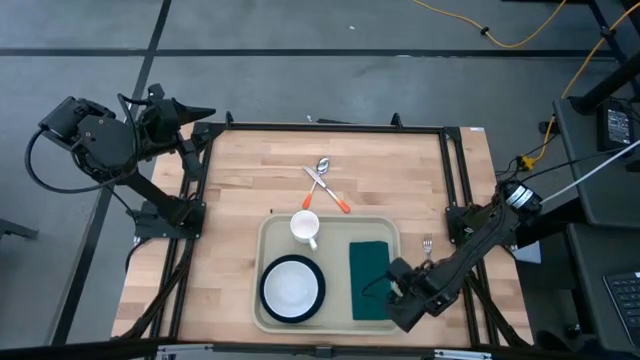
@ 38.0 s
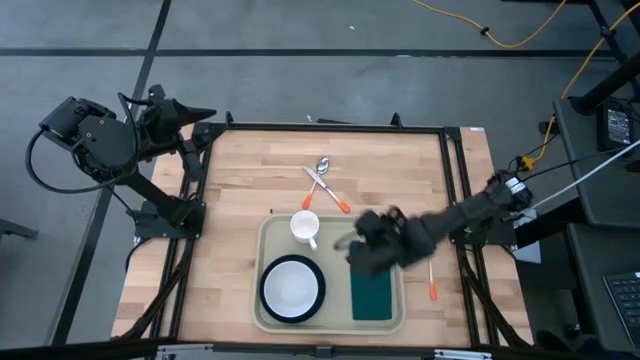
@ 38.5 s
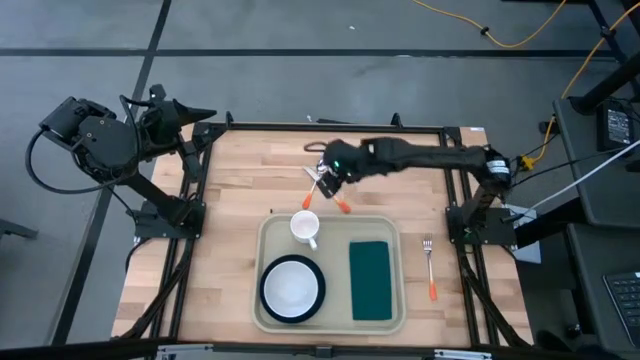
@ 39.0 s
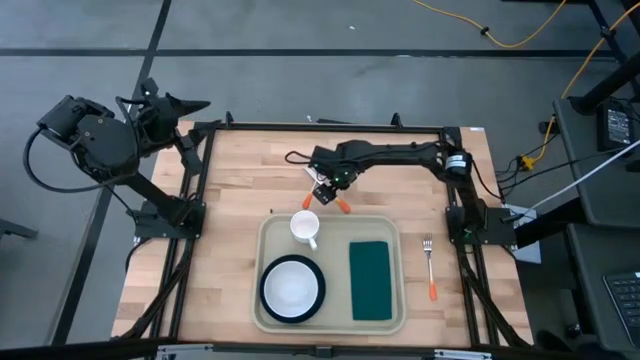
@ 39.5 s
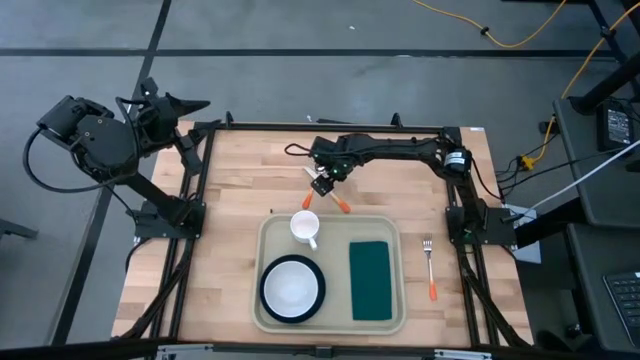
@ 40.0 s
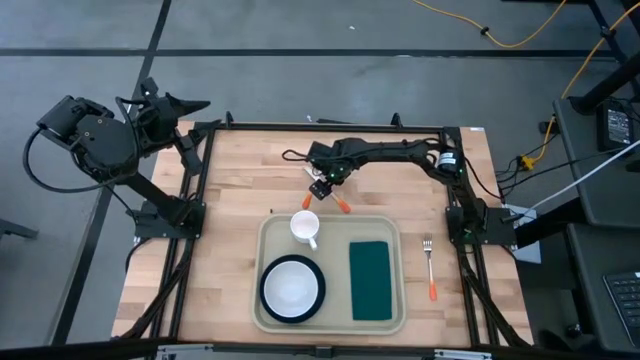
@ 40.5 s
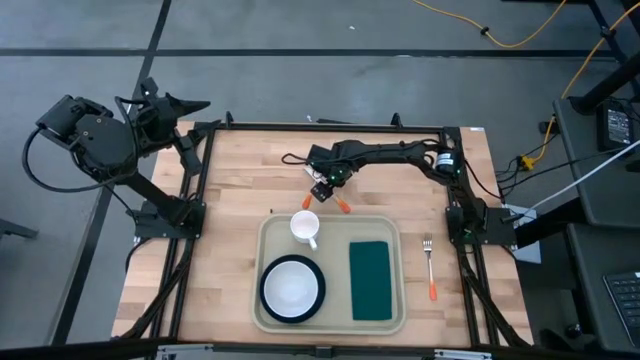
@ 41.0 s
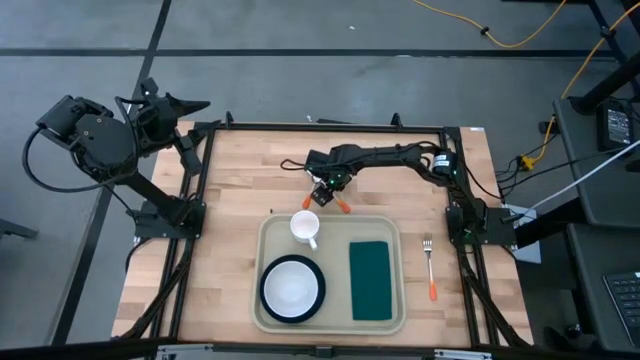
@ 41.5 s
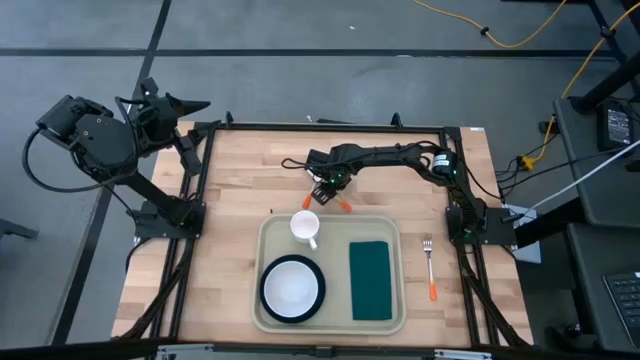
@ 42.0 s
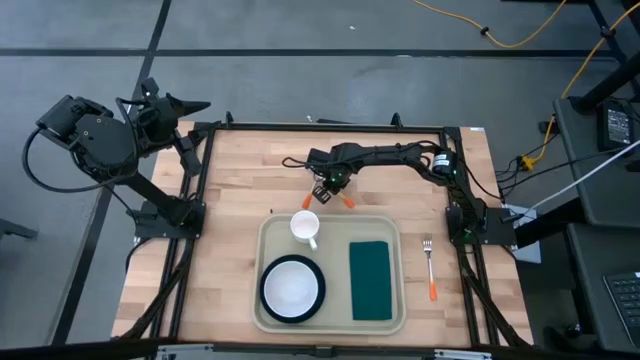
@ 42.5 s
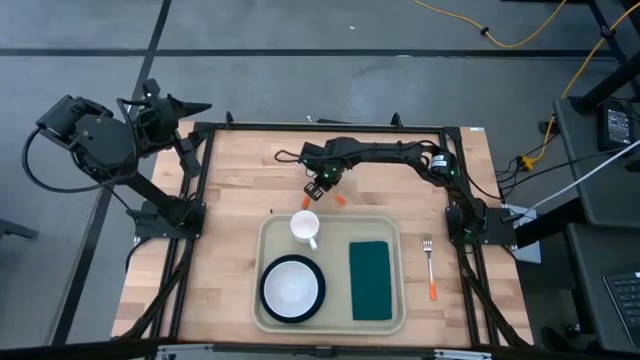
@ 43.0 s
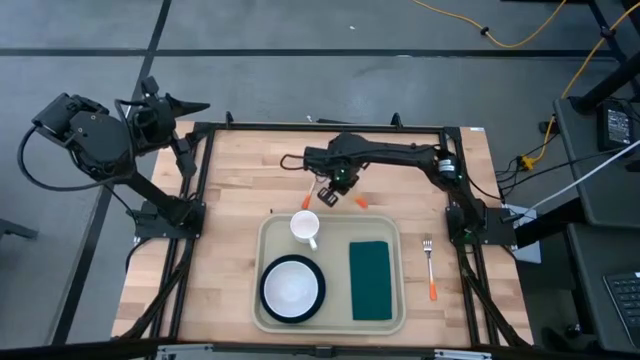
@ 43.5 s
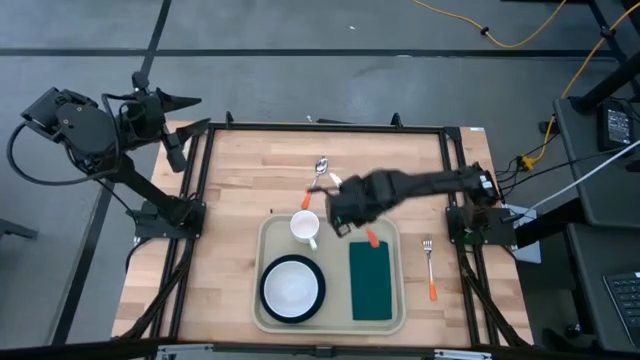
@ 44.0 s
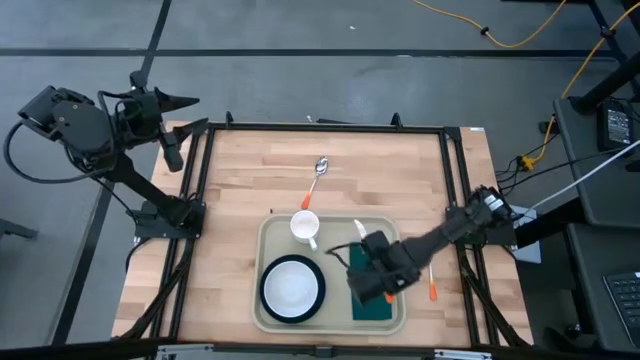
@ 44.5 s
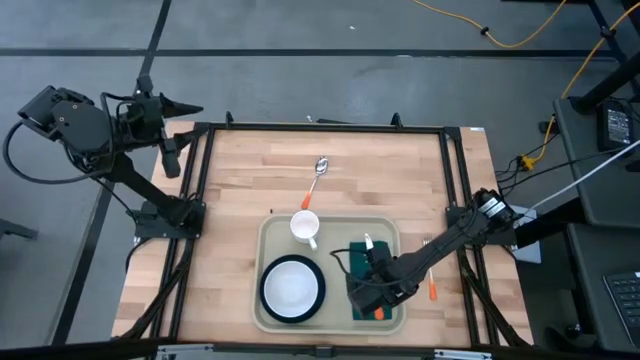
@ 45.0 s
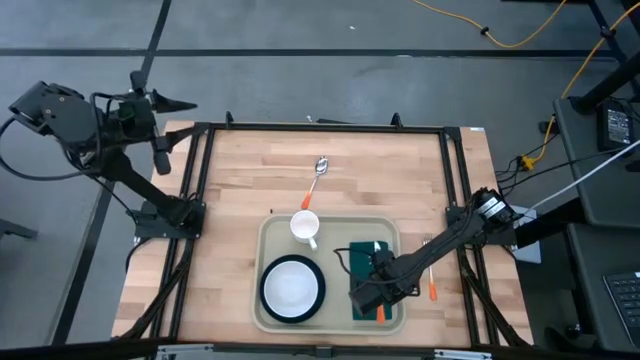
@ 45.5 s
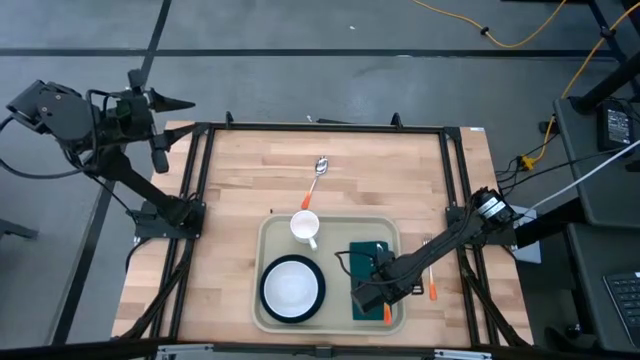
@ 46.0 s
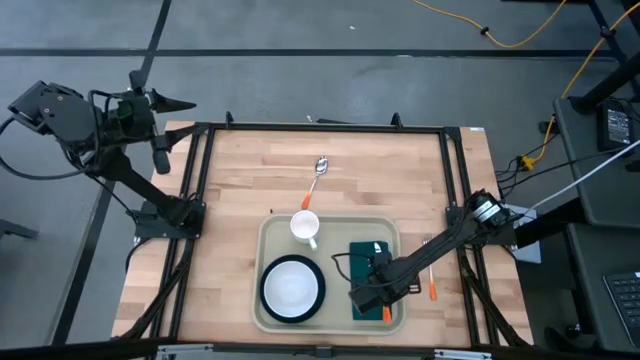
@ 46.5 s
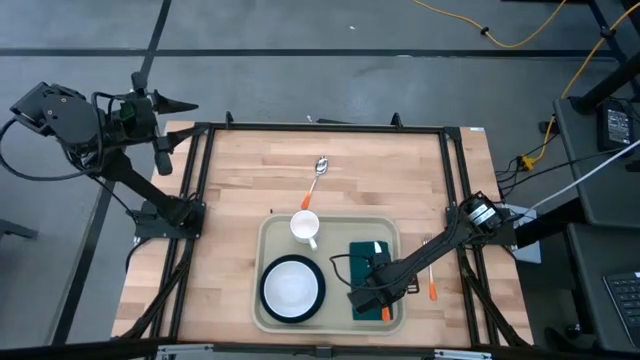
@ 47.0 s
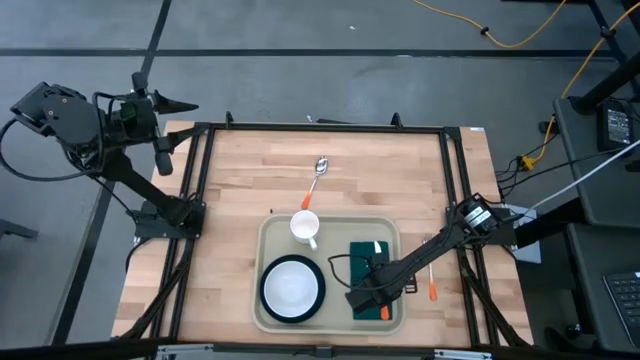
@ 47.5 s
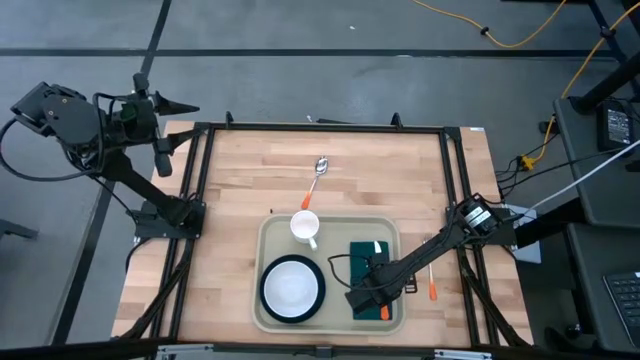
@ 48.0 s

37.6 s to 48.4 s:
Task: Set up tray
Put the orange knife on the dark green napkin

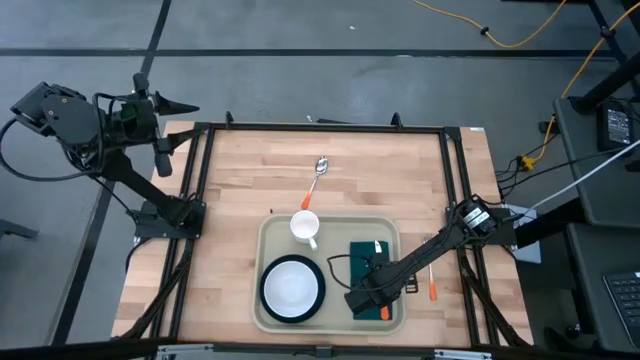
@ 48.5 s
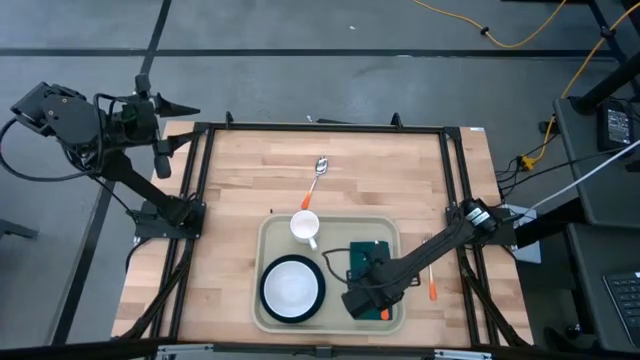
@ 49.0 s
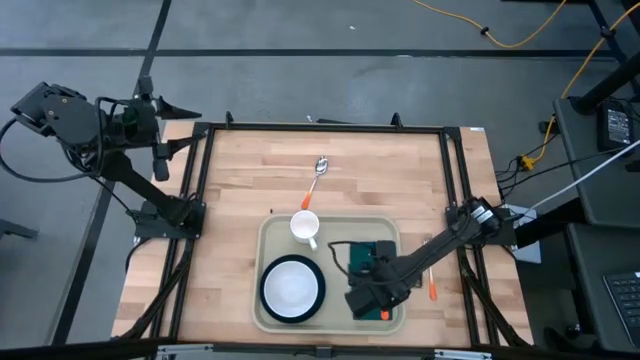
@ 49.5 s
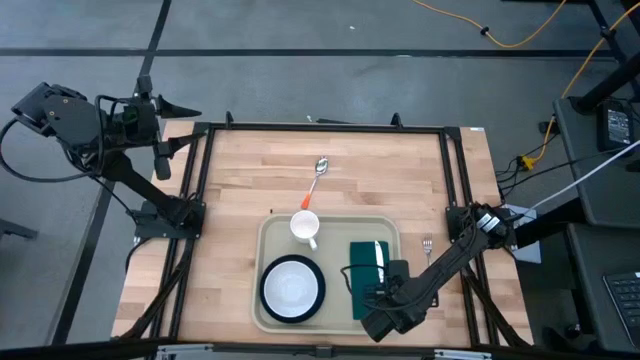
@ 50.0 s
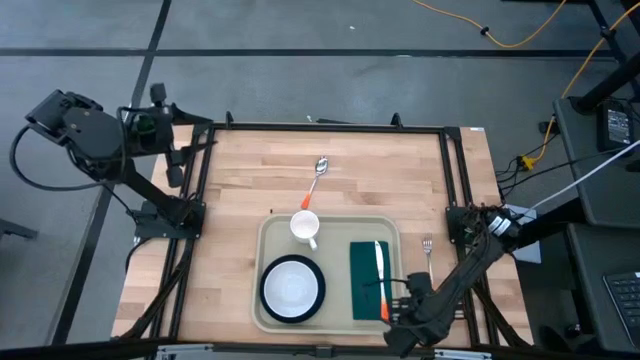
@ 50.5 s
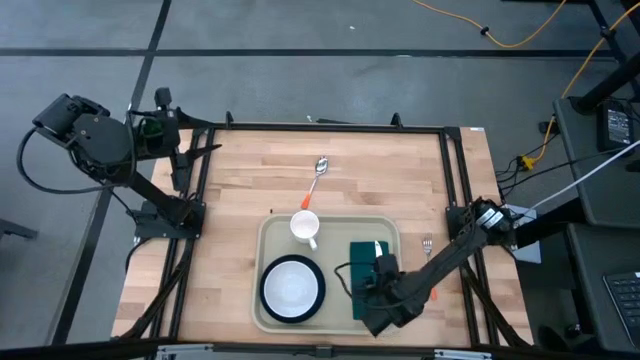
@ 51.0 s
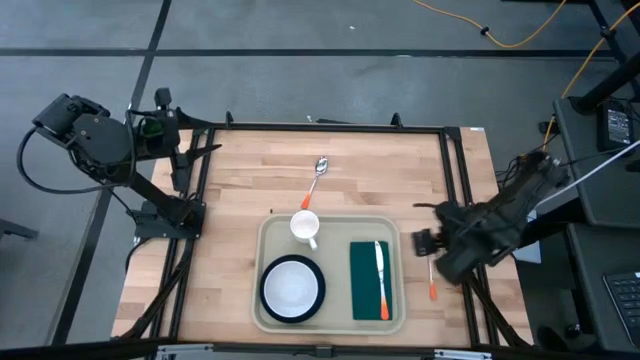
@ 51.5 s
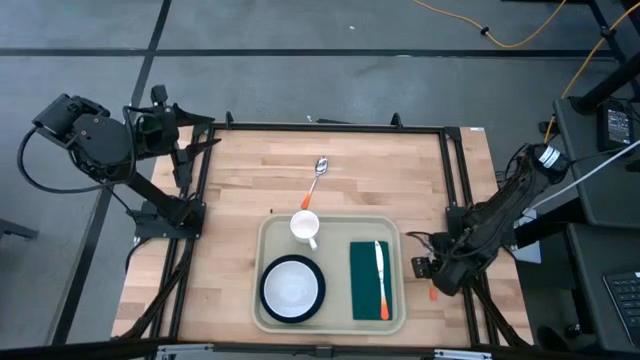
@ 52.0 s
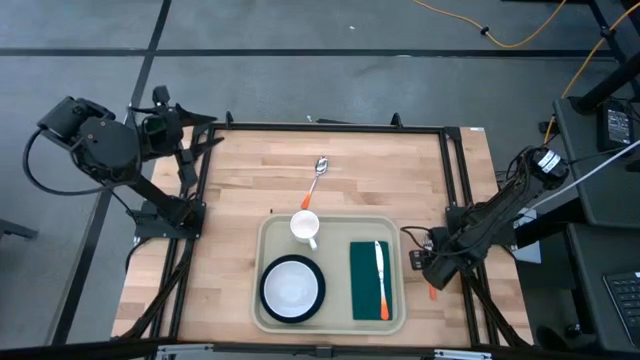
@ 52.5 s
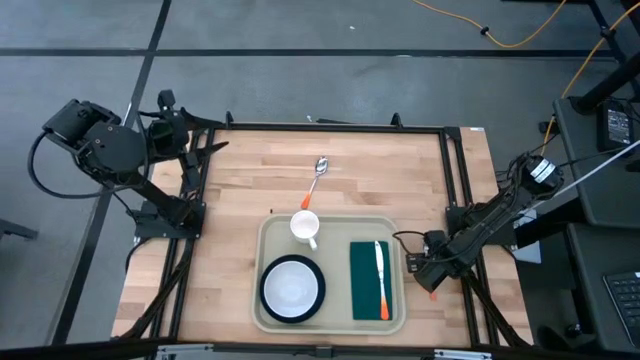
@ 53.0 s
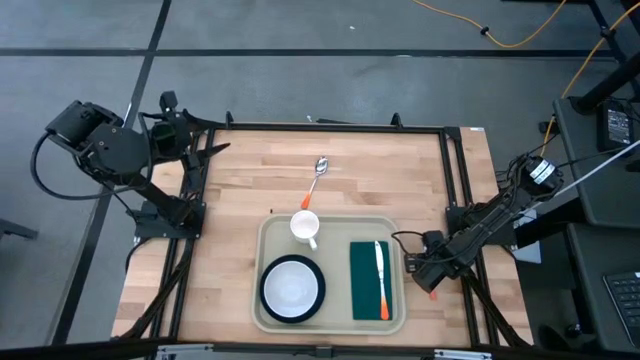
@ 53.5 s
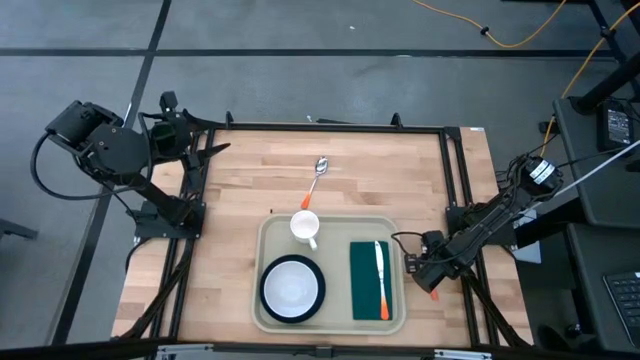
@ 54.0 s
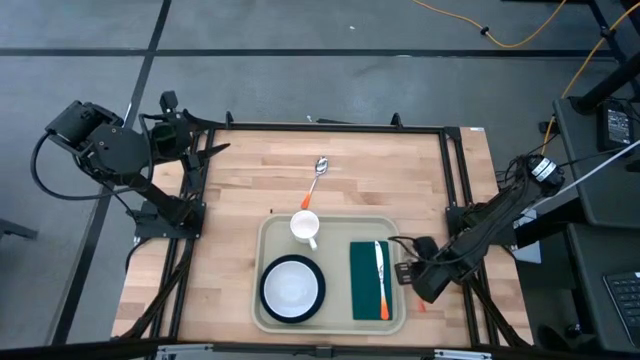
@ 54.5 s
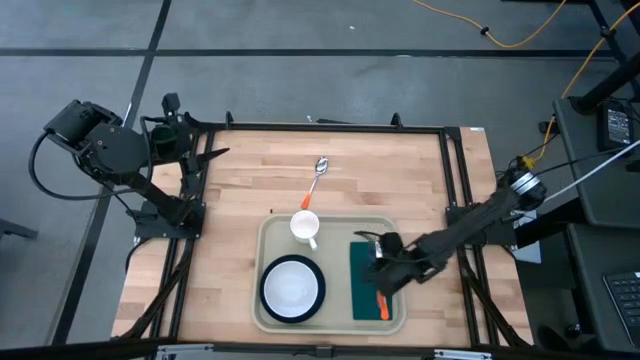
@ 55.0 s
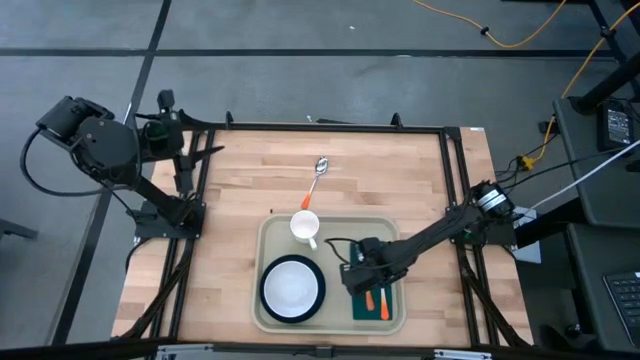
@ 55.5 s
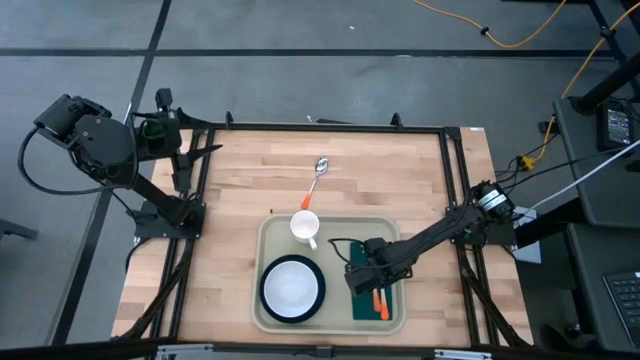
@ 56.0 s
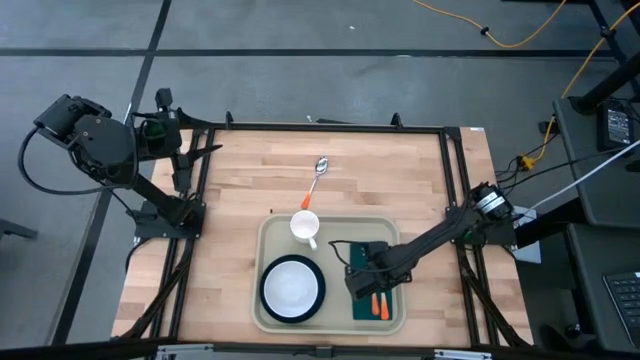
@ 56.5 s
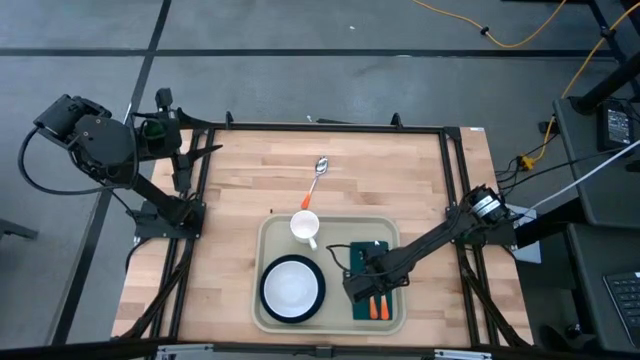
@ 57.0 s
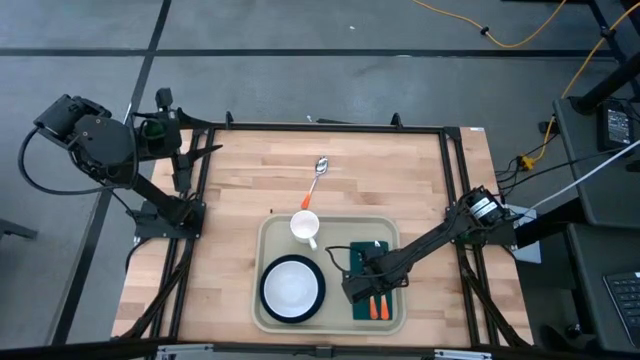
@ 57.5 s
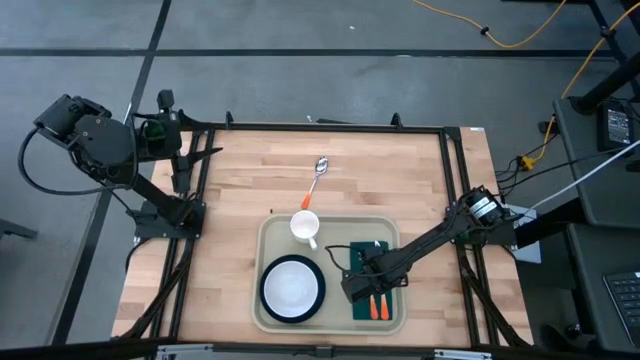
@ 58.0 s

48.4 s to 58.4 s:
Put the orange fork on the dark green napkin to the left of the orange knife

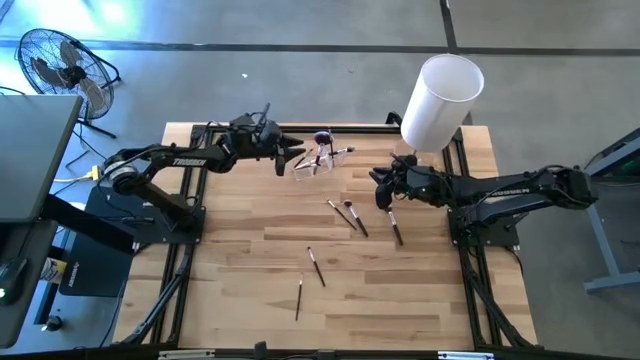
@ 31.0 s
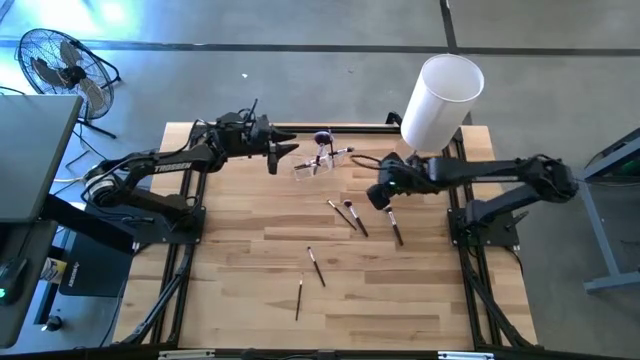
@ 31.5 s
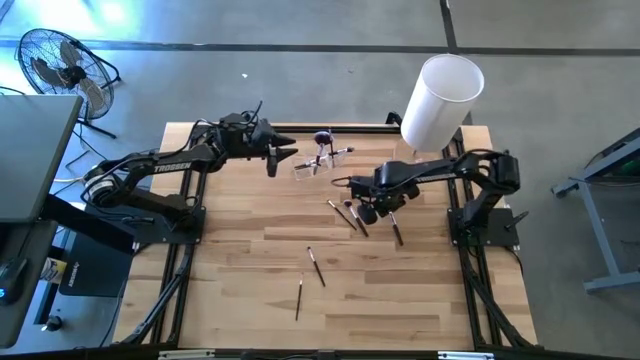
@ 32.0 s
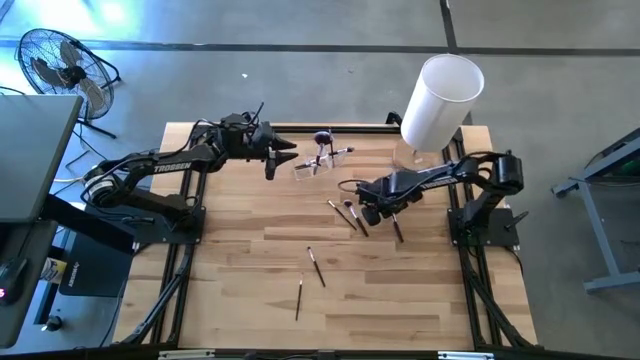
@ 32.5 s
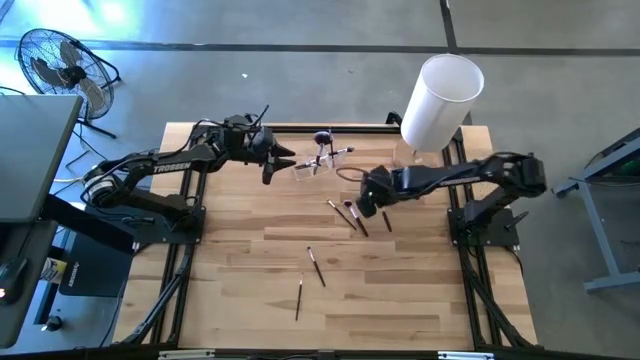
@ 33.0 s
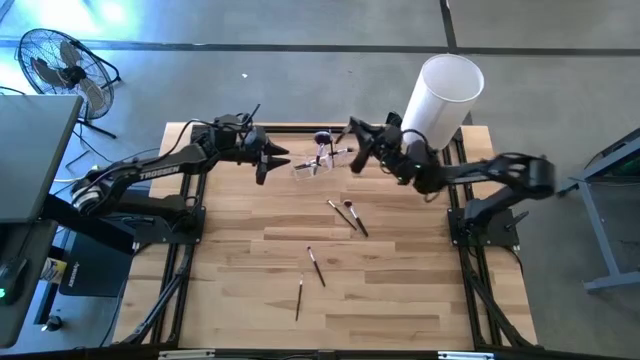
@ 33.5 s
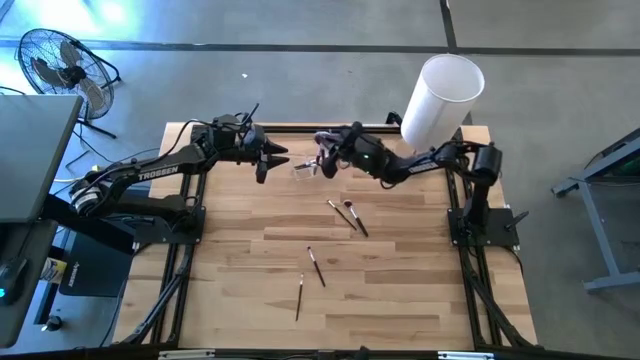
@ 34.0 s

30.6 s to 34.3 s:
Task: Put items in baskets/containers
Put the black powder brush into the transparent organizer
